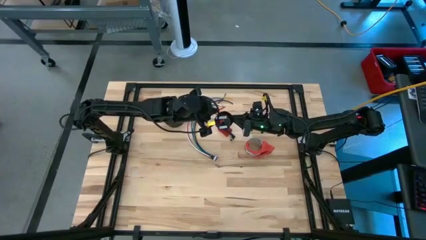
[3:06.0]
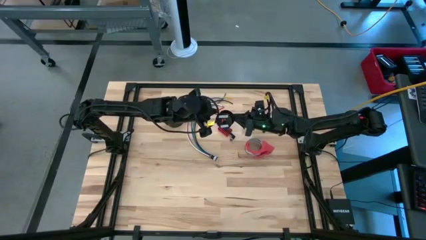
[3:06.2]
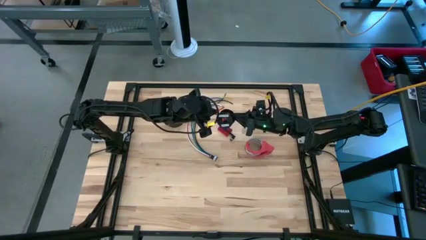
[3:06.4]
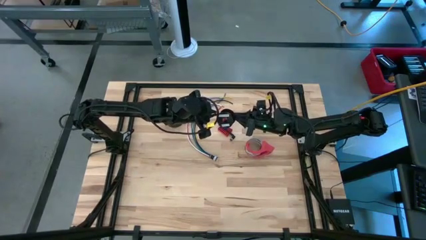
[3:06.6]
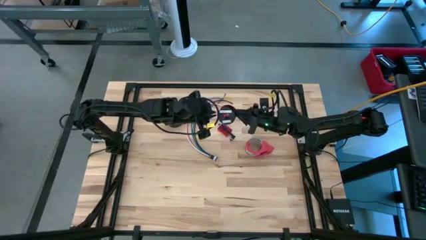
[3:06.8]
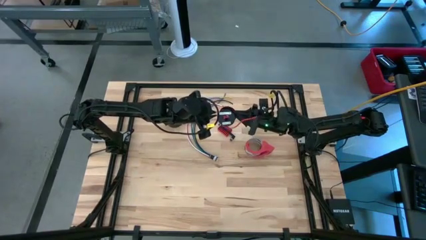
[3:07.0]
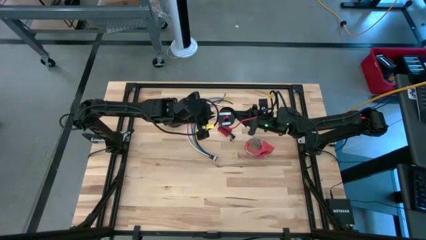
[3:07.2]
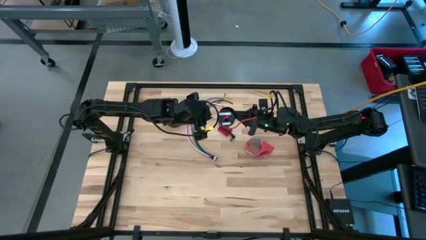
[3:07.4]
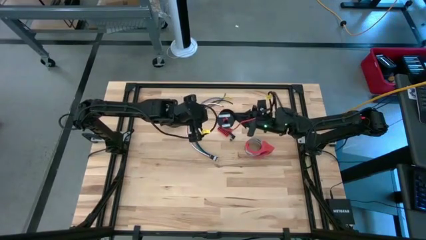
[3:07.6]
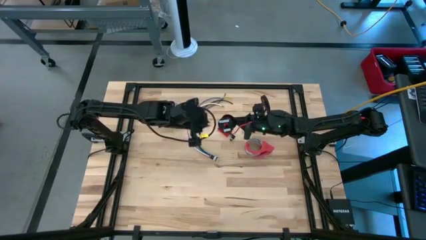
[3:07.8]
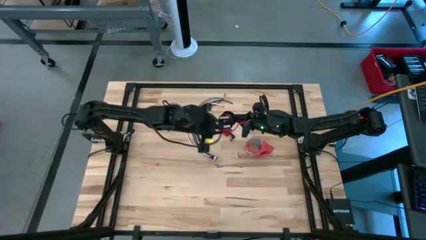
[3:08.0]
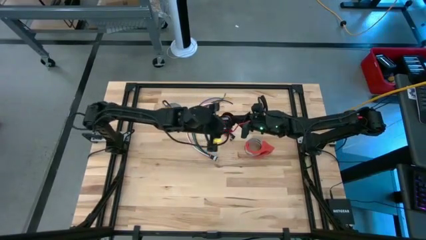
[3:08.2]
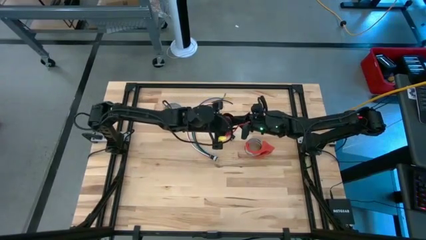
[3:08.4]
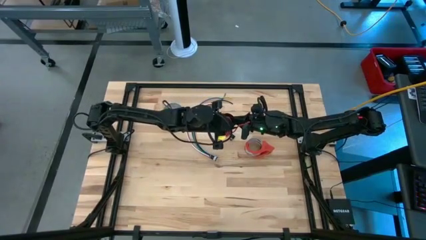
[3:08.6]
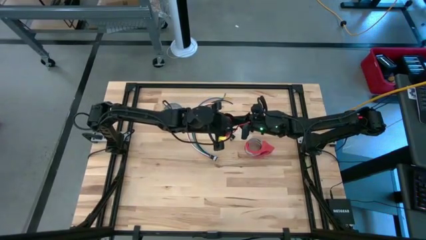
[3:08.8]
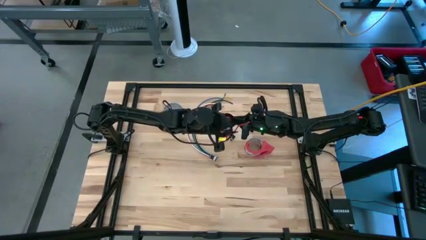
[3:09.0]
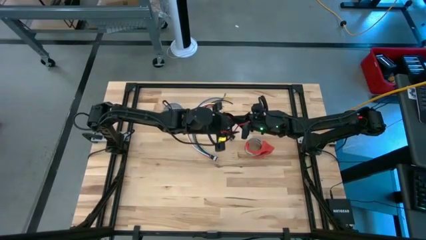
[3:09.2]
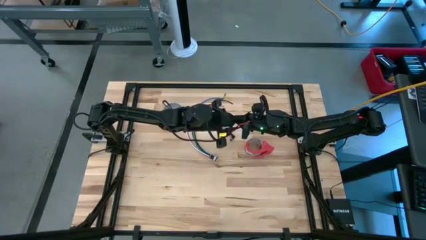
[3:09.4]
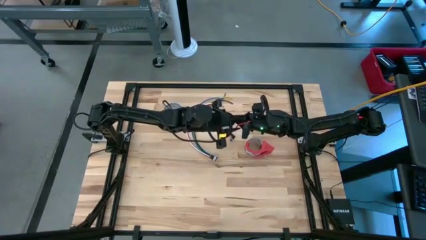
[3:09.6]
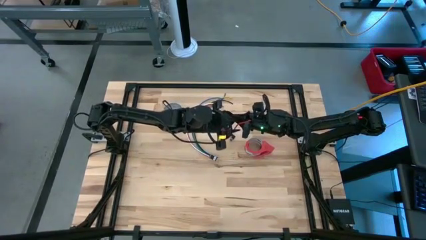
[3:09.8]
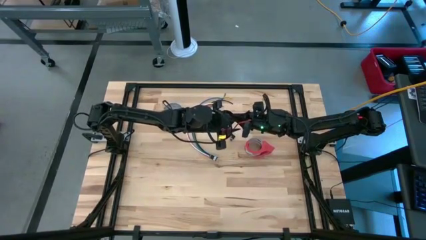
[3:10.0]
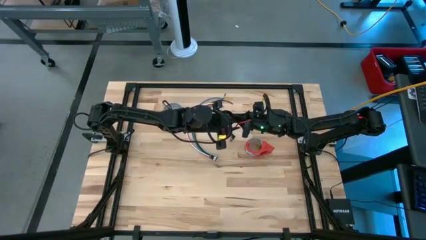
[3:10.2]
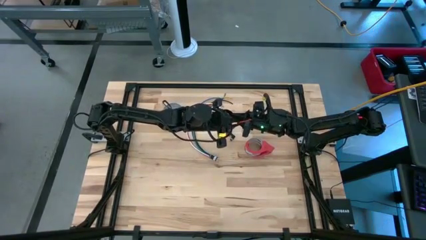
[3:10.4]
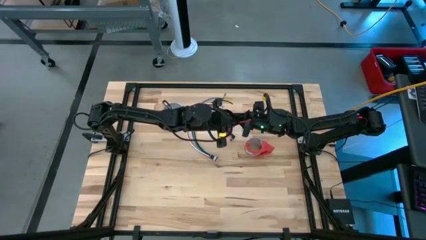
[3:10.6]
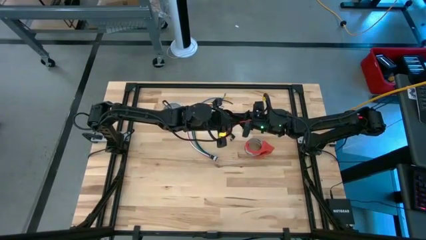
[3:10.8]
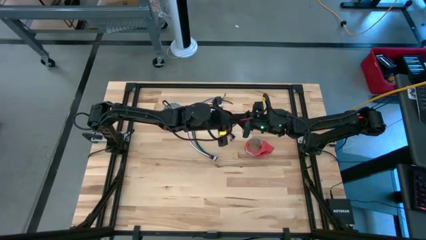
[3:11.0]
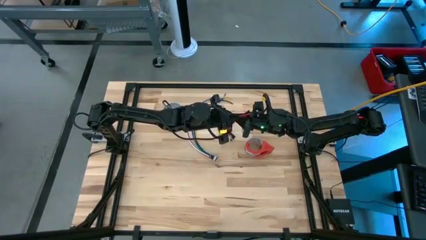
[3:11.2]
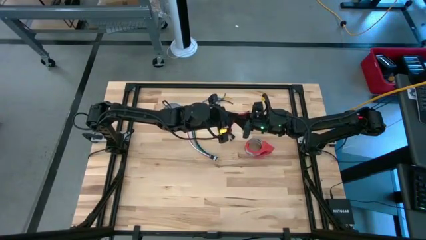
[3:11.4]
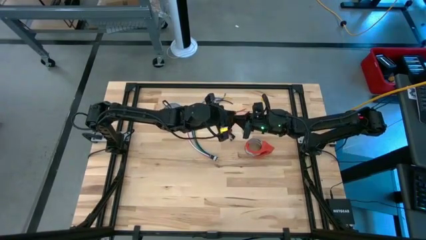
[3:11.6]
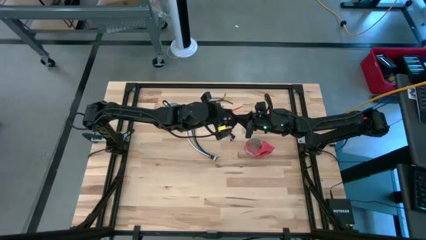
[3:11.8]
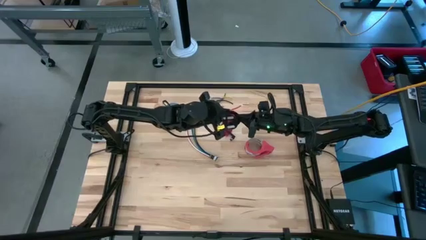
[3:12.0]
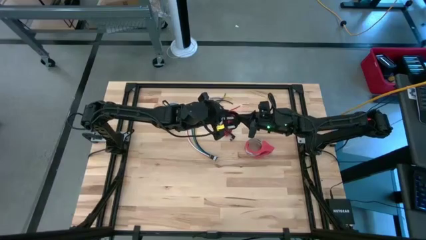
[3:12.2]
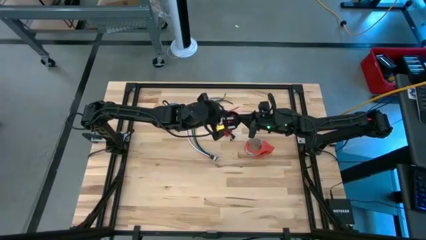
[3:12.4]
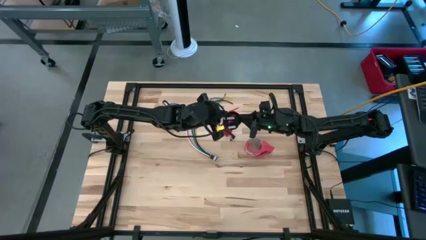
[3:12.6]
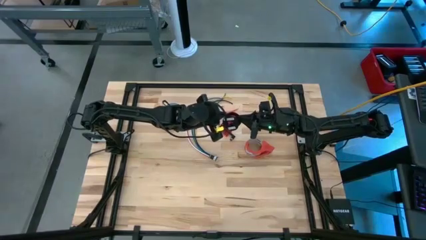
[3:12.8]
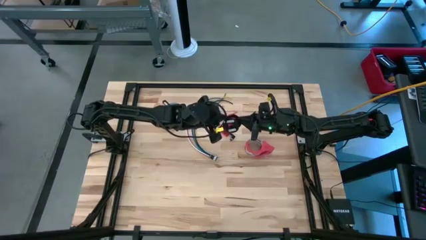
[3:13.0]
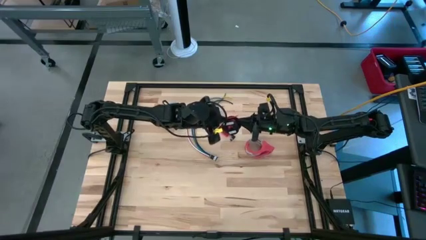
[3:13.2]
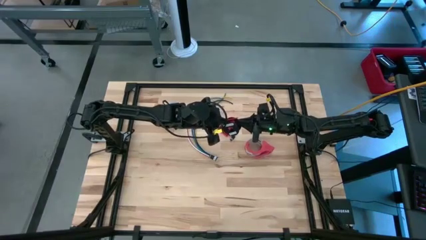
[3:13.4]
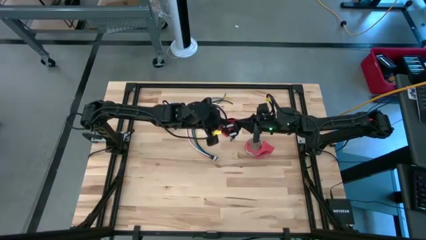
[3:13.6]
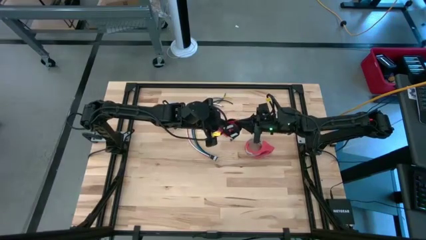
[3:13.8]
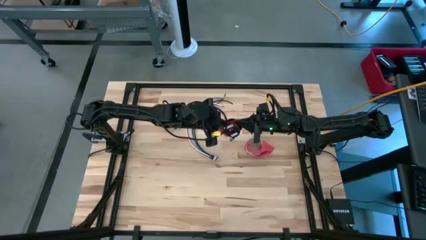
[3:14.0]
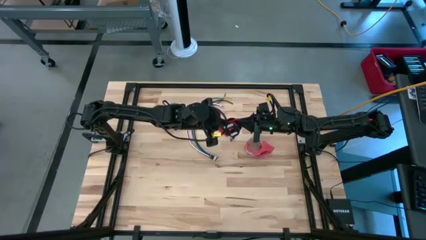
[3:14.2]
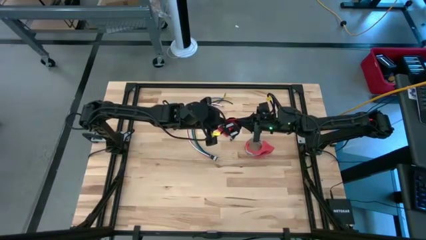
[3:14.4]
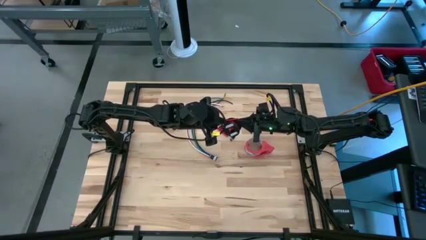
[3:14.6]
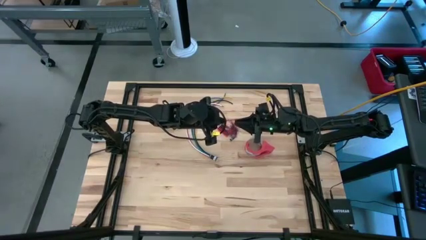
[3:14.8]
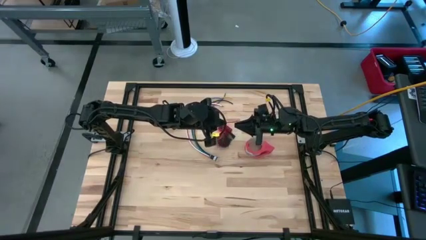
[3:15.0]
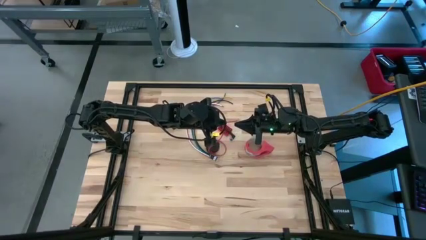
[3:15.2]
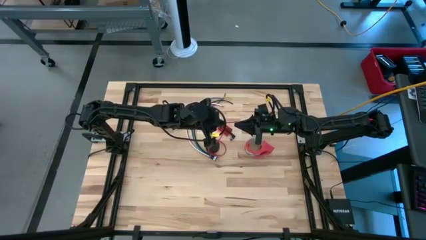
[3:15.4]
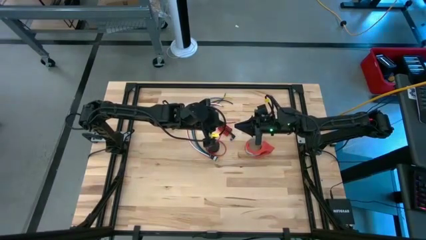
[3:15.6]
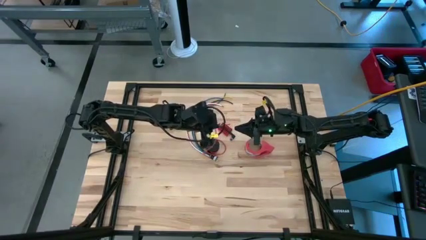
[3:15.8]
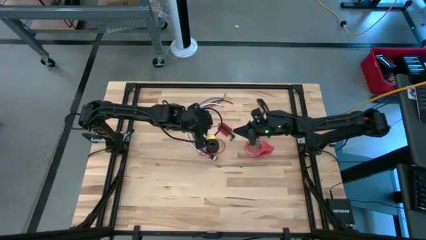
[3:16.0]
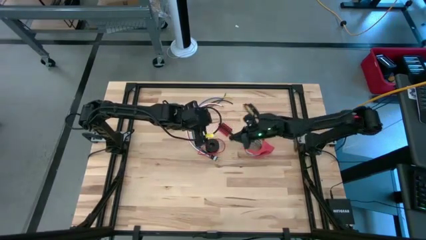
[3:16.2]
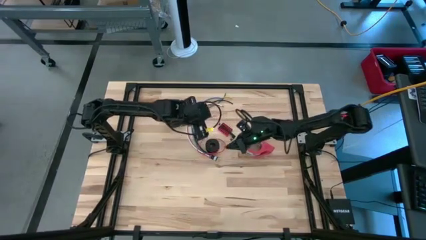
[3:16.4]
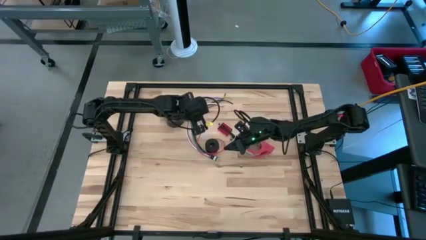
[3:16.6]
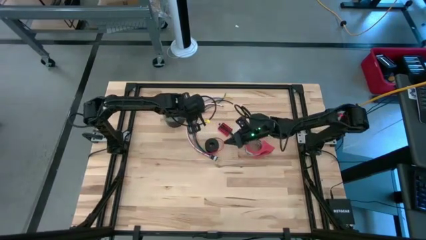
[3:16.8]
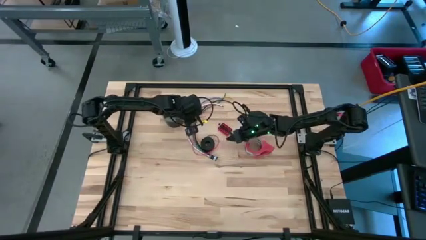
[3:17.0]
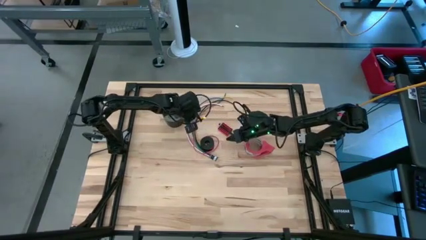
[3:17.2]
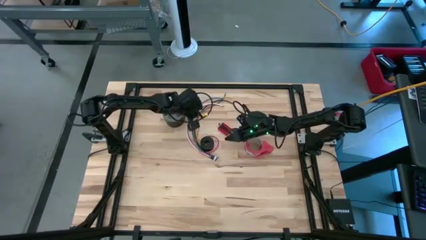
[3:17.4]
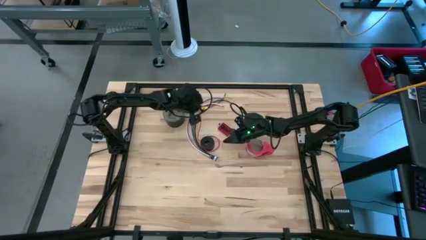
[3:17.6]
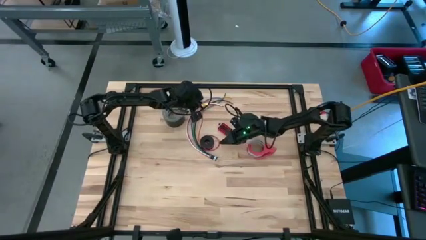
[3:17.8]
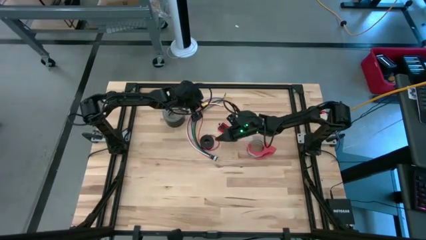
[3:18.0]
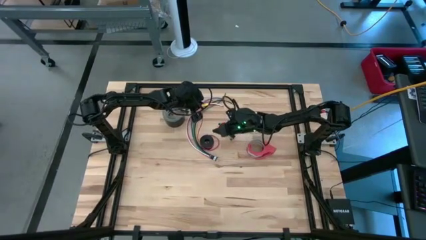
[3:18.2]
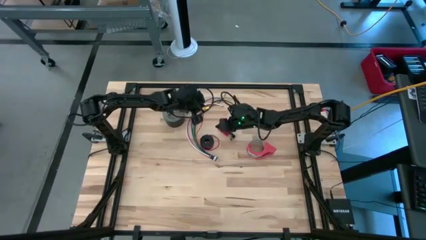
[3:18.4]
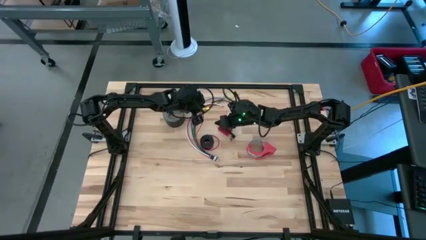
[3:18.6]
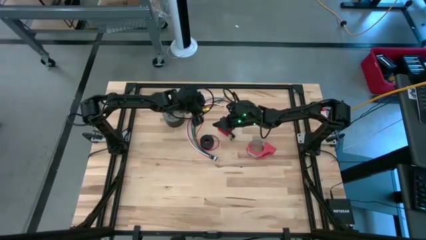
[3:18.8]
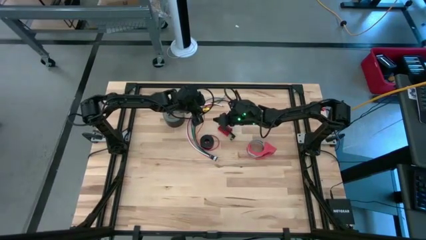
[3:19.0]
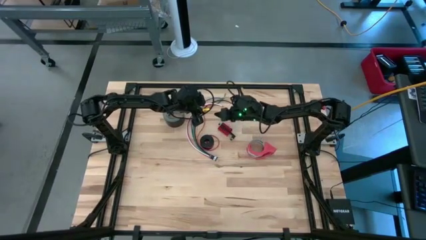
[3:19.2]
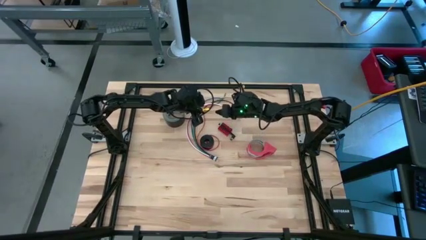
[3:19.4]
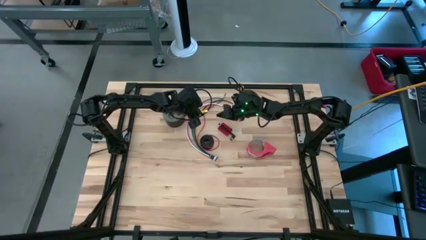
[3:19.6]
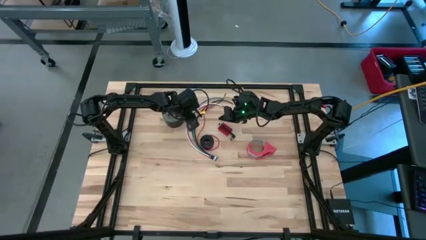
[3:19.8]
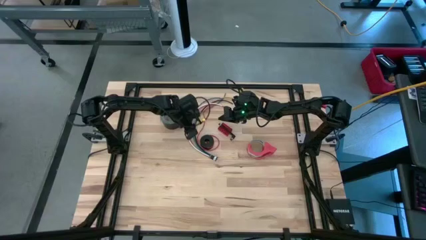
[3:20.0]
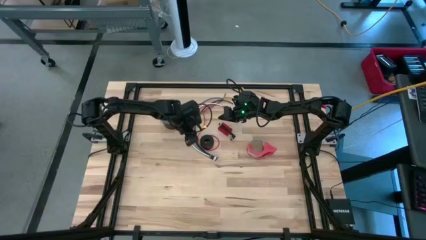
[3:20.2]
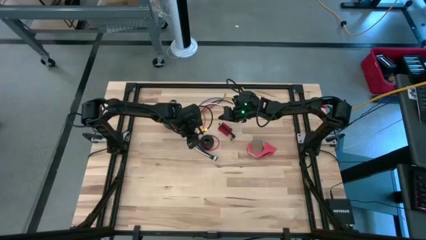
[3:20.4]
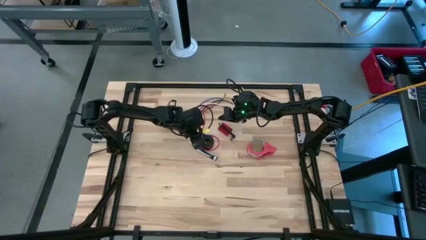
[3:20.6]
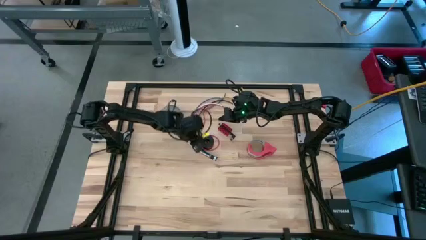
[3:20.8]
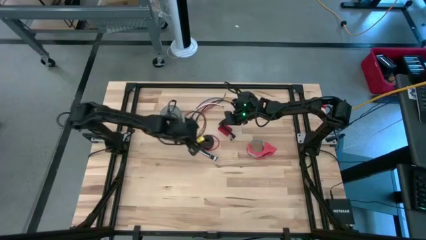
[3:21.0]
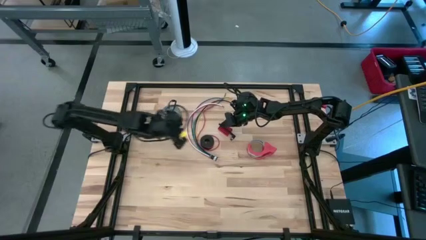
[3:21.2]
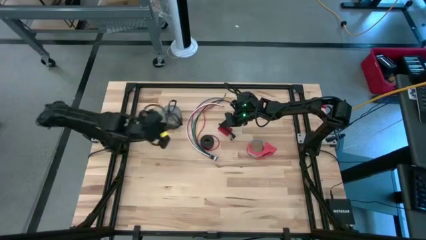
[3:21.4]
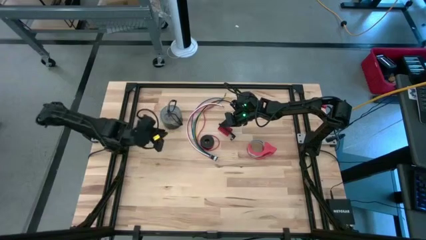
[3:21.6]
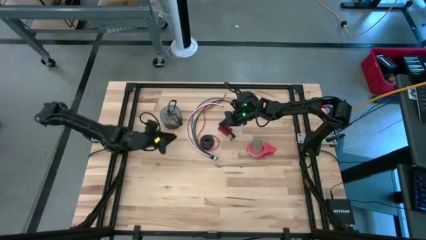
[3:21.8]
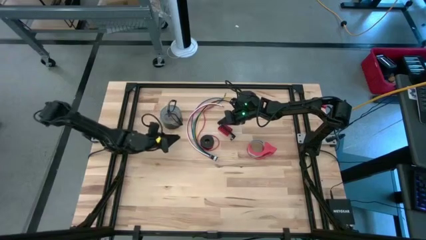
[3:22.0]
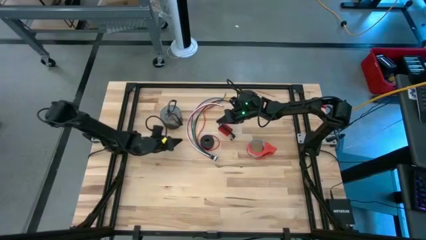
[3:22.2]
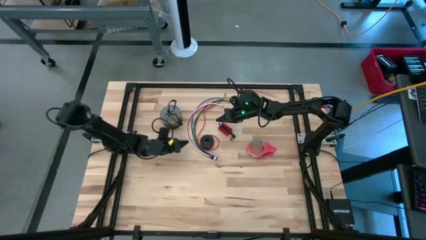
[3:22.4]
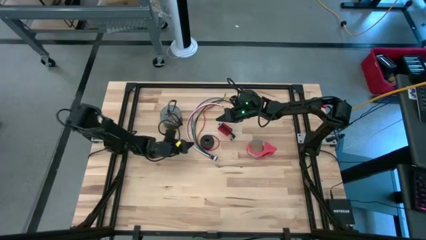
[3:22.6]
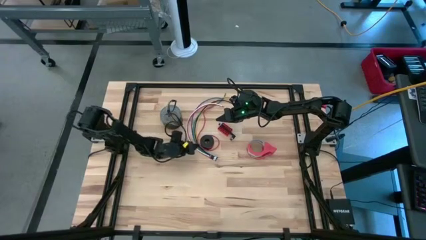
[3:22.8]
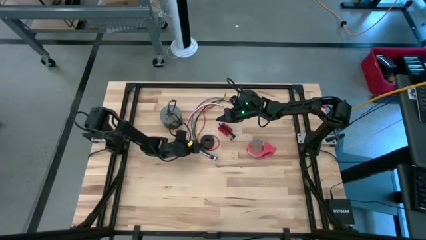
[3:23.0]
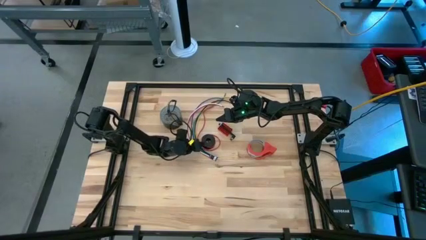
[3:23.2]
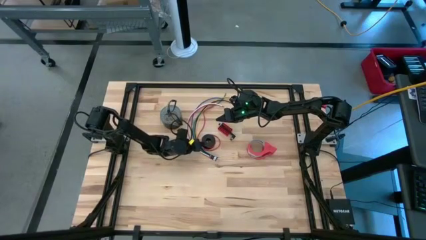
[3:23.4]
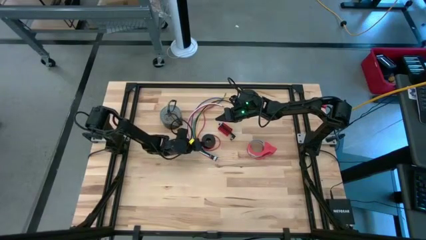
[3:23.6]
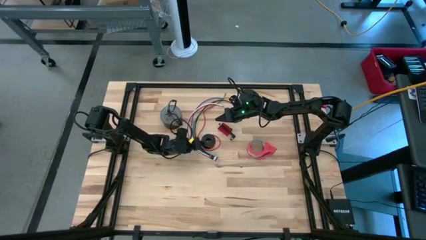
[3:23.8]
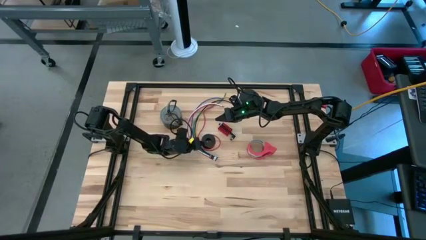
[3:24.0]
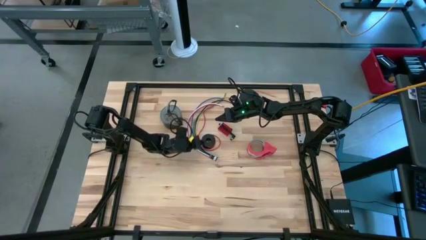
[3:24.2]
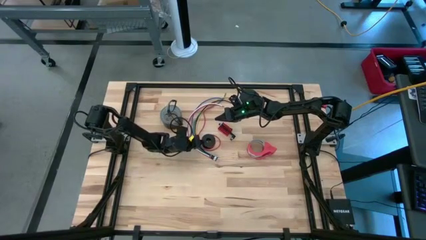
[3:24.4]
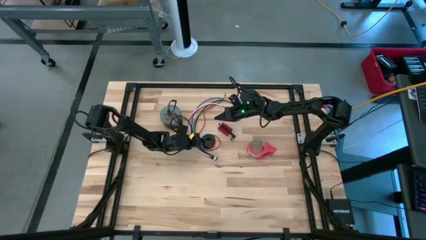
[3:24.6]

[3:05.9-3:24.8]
Task: Coil cords
Coil the red wire onto the spool
